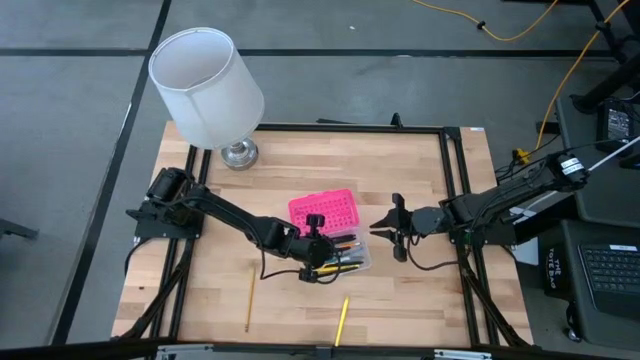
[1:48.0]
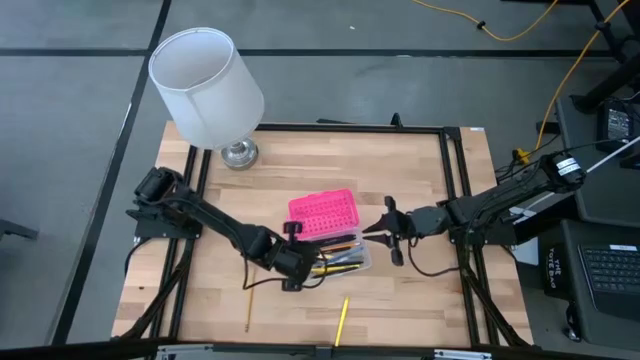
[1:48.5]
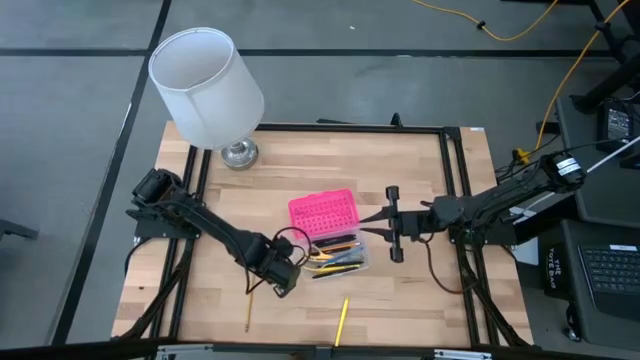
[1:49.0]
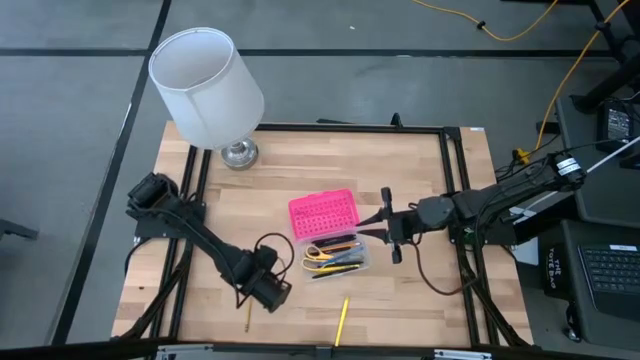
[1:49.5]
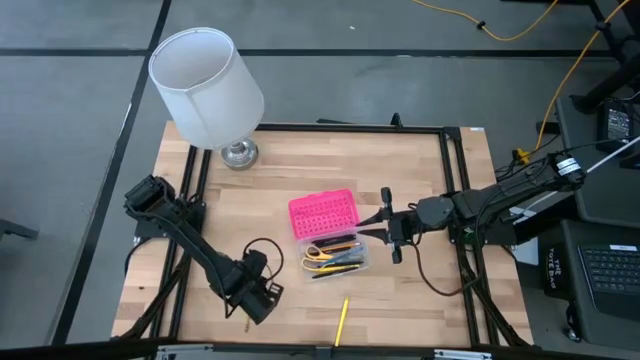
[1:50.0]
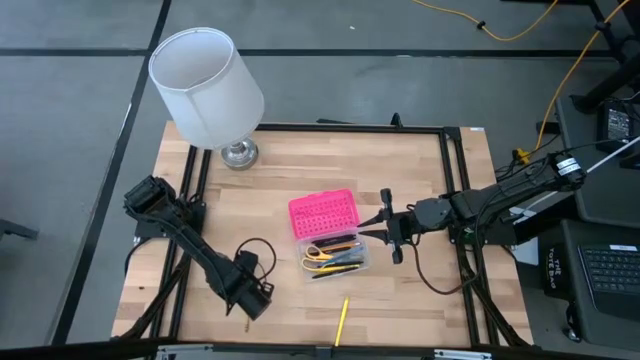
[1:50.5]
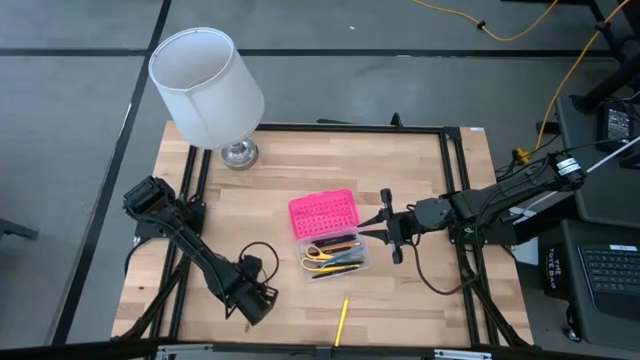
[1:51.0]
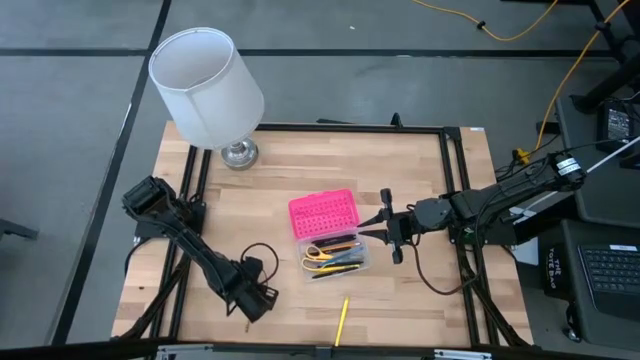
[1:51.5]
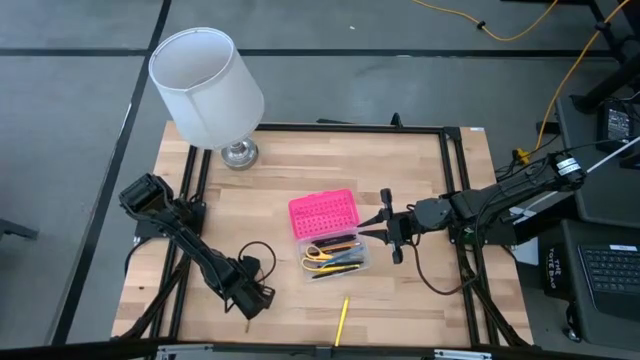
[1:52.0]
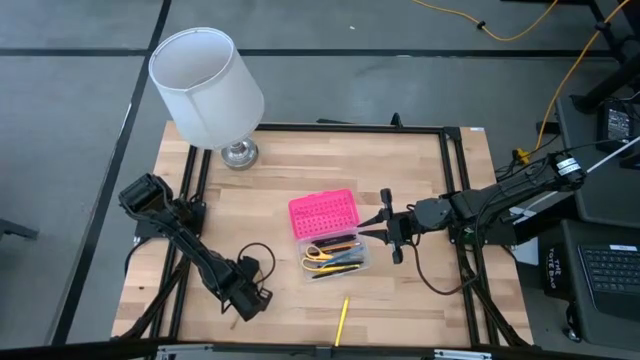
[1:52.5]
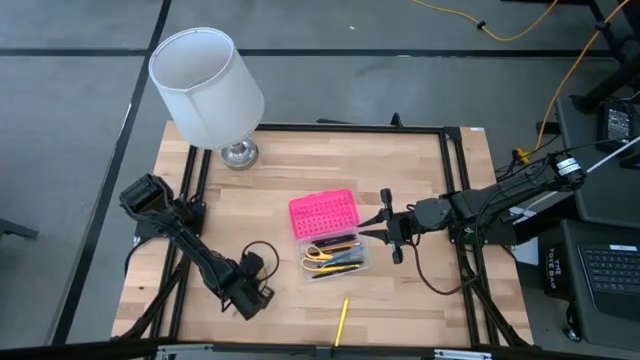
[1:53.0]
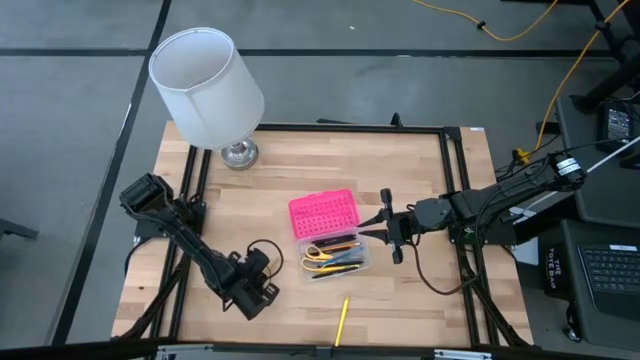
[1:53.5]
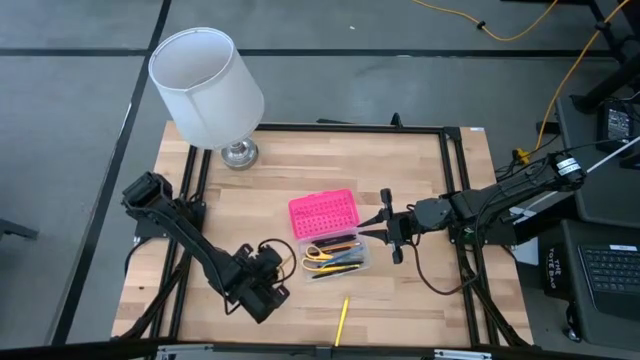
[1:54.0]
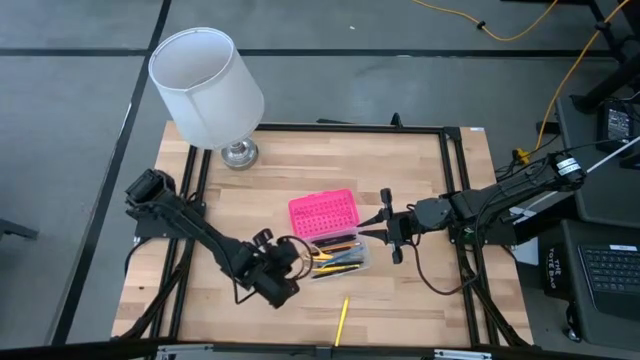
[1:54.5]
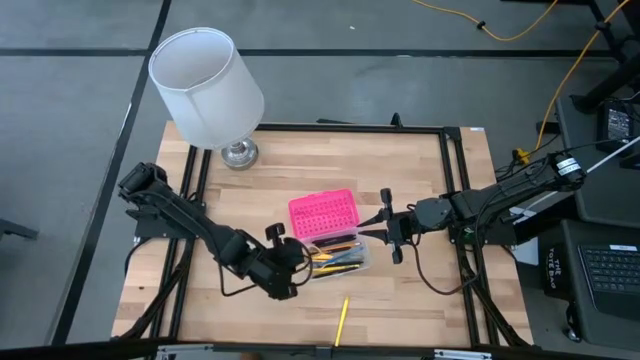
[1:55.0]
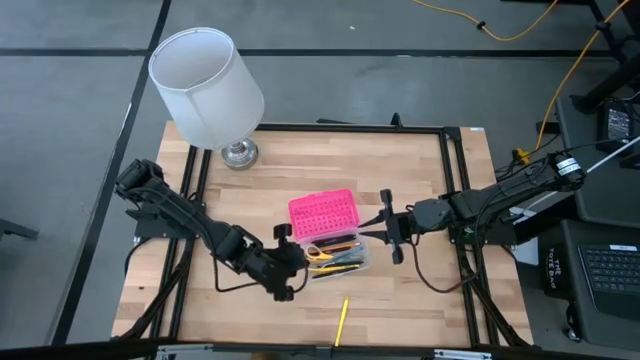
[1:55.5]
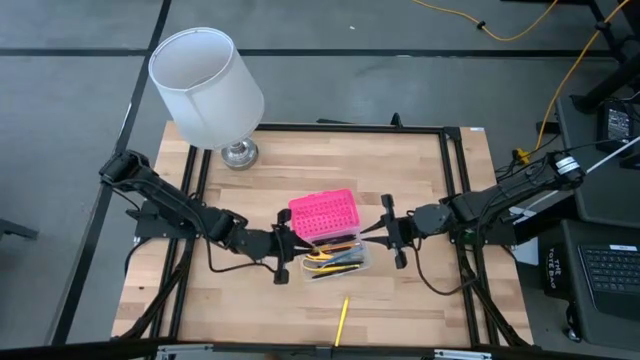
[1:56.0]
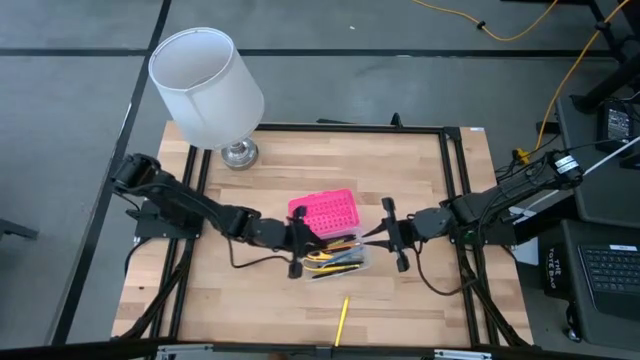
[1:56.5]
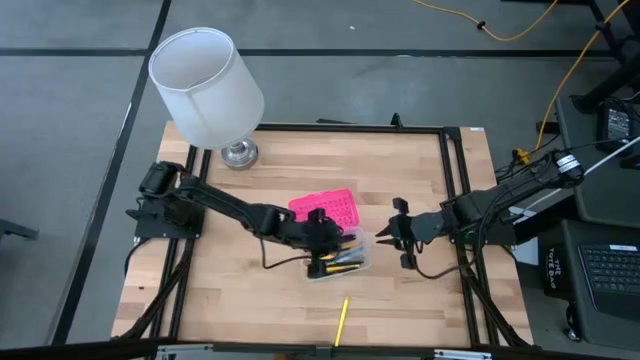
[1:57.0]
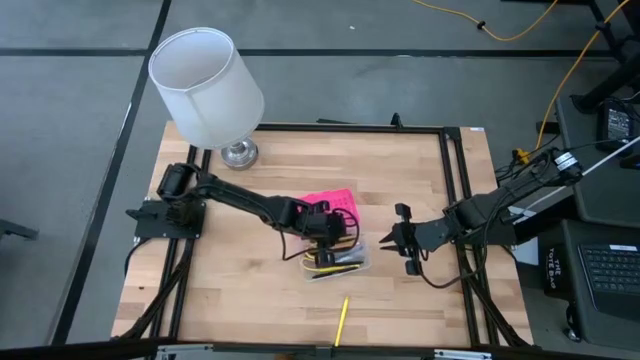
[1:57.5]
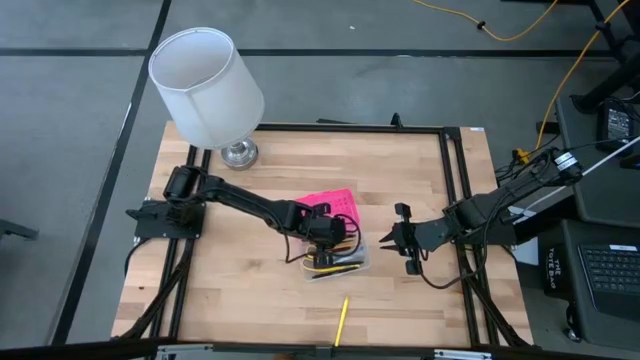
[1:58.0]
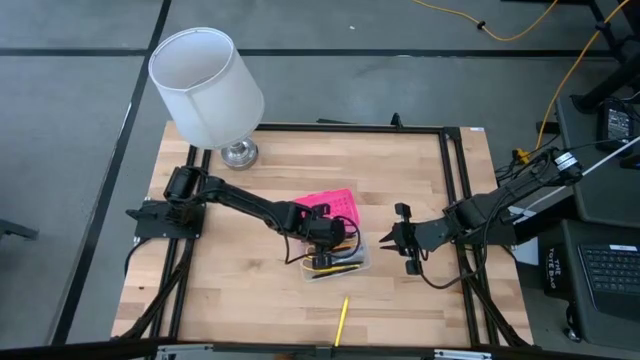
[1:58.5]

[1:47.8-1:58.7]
Task: Pick & place school supplies into a supply box
Put the yellow pencil into the pink supply box

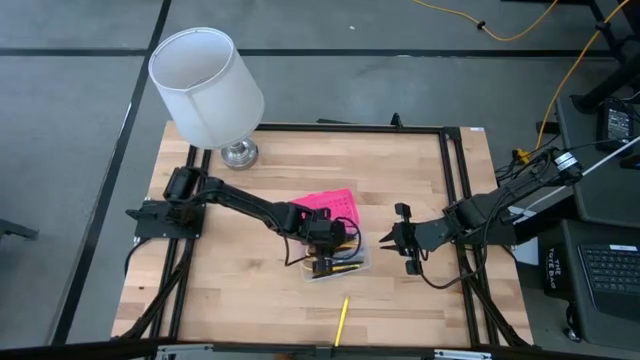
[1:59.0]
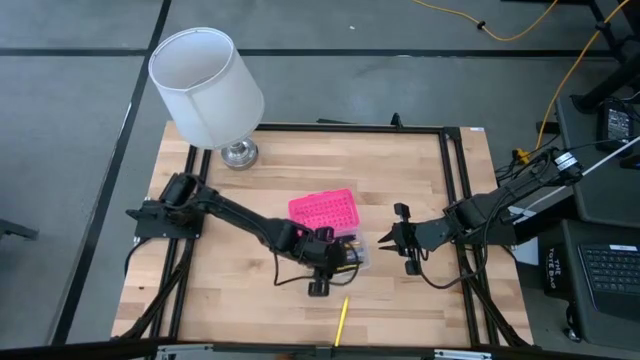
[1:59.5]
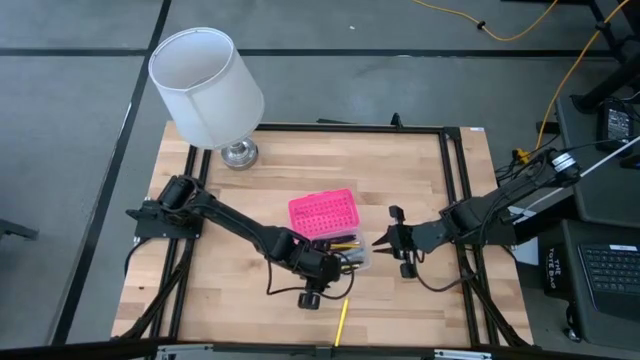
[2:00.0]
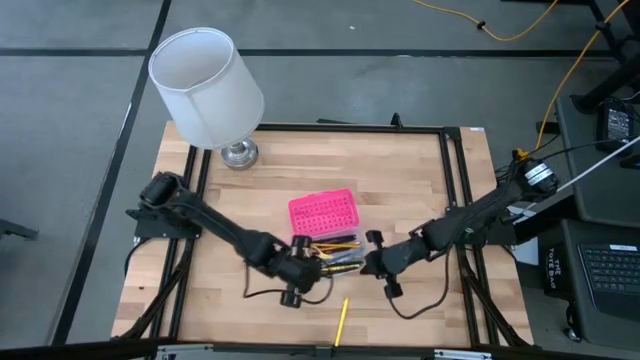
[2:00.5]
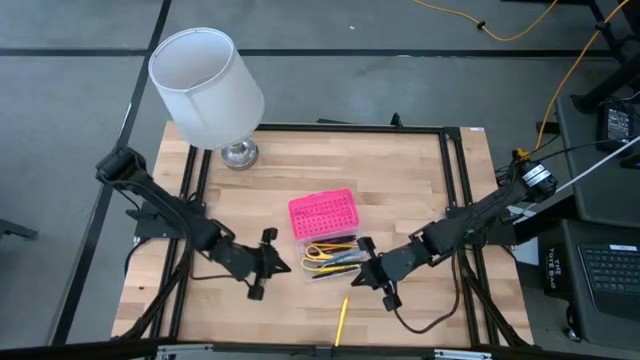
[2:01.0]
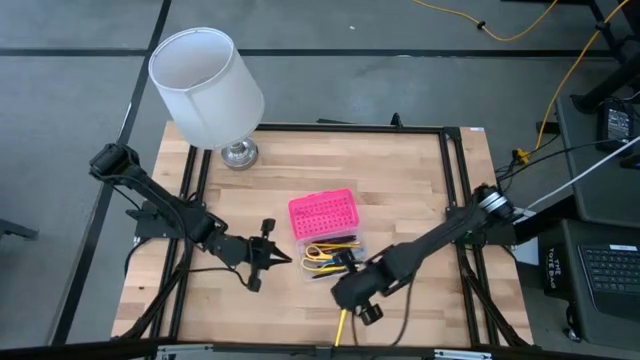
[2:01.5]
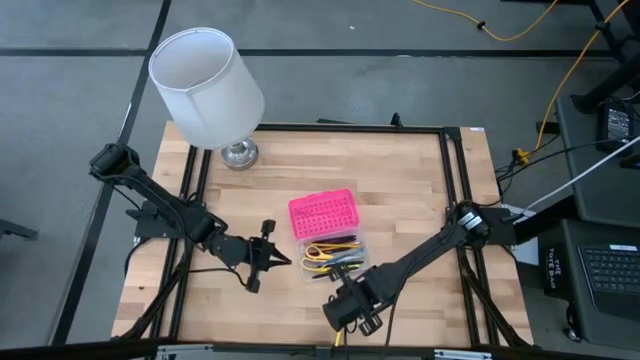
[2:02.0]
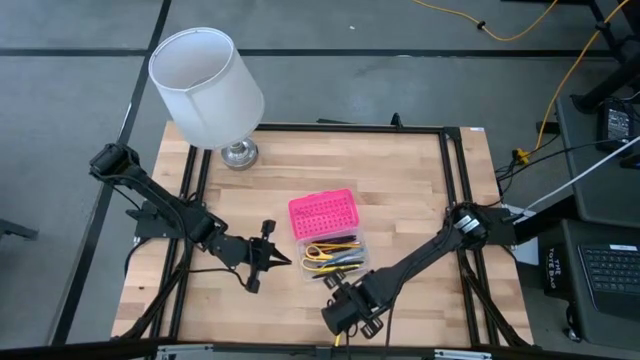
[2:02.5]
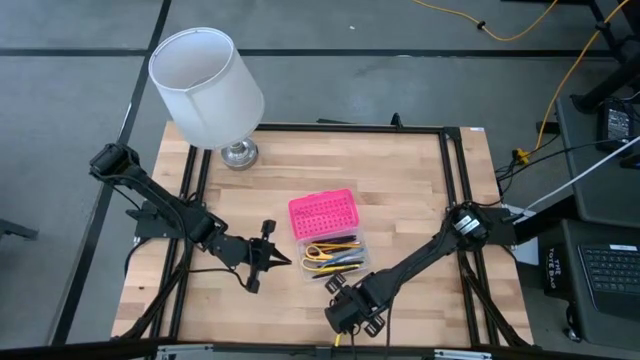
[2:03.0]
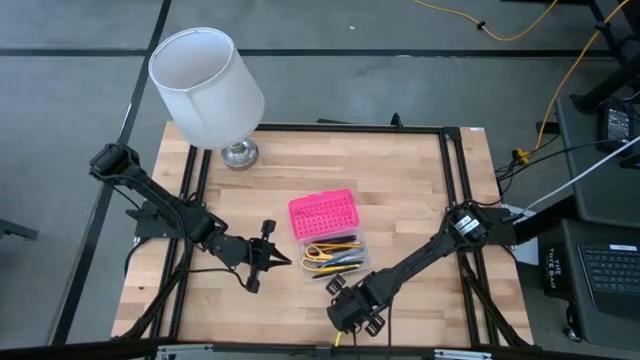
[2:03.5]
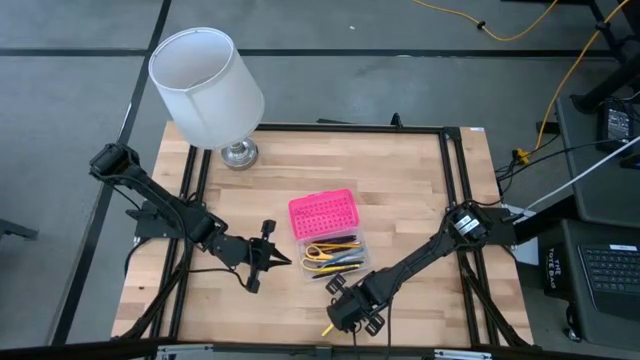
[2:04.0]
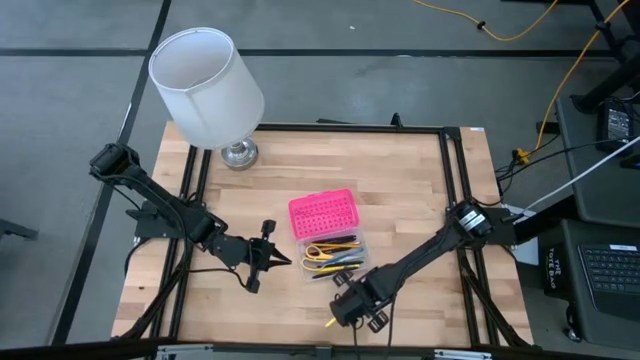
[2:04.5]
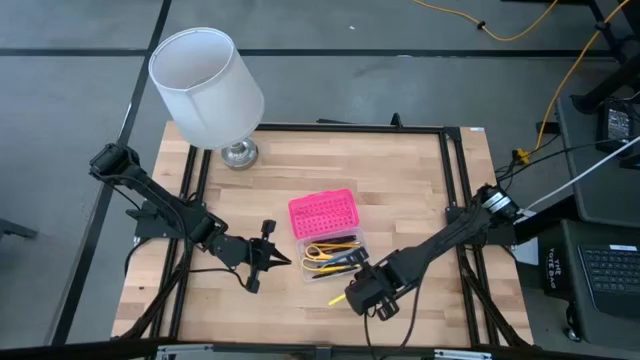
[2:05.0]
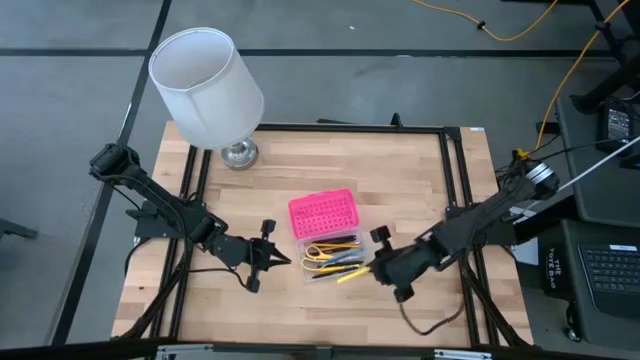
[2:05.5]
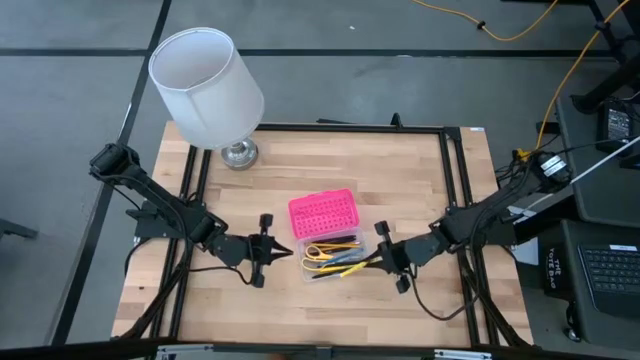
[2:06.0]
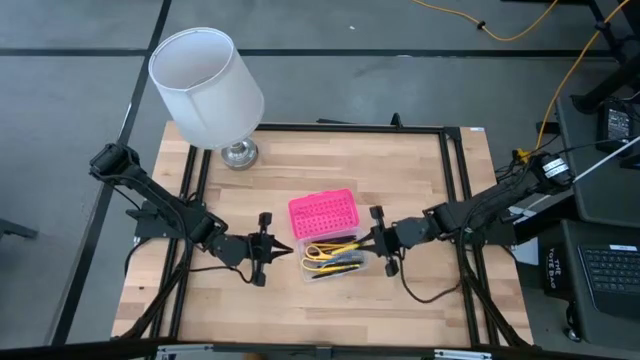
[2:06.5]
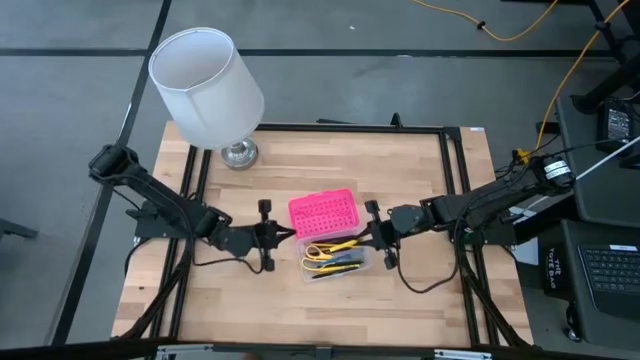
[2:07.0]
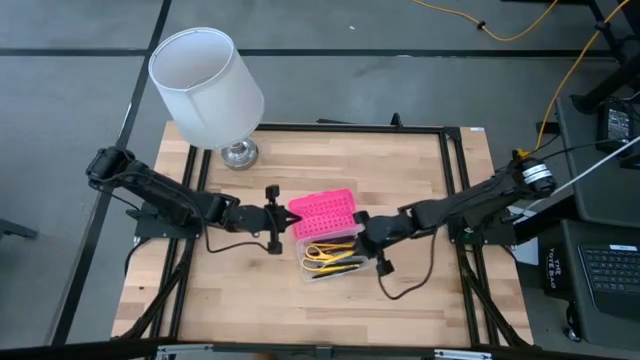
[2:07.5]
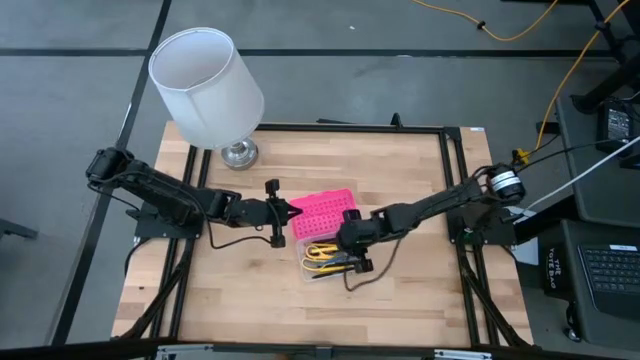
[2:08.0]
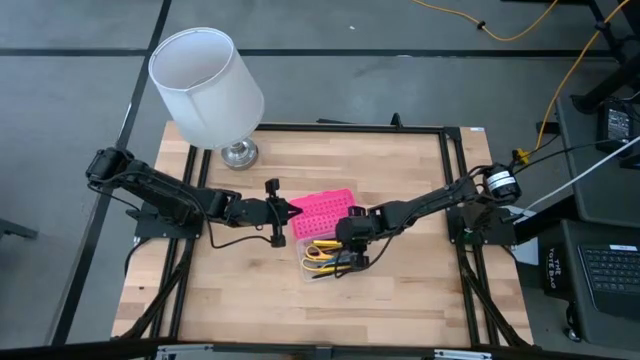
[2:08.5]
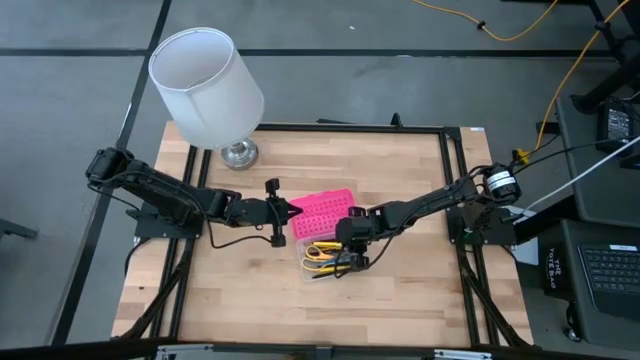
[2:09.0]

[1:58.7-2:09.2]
Put the yellow pen into the pink supply box
